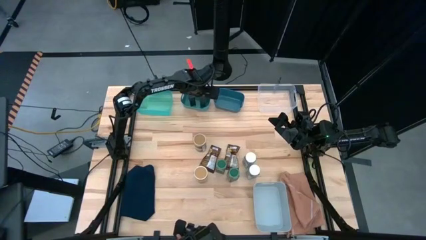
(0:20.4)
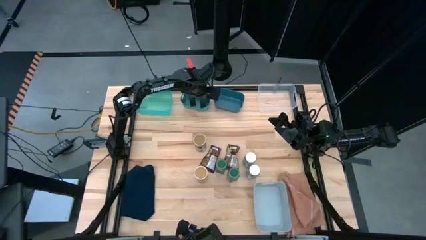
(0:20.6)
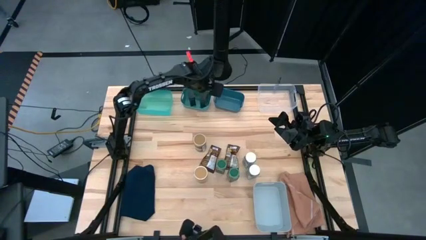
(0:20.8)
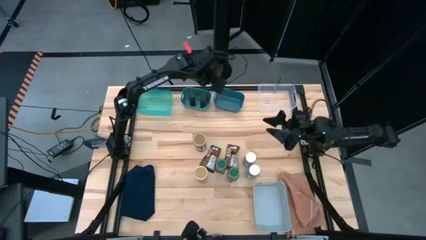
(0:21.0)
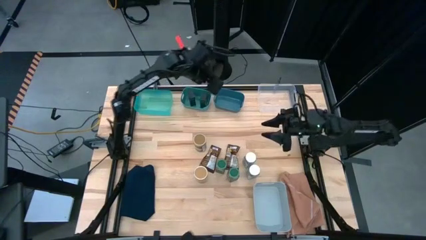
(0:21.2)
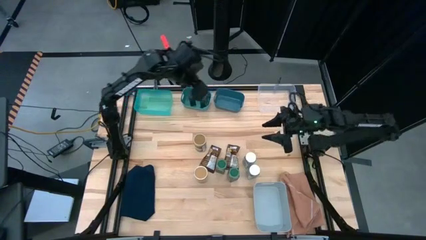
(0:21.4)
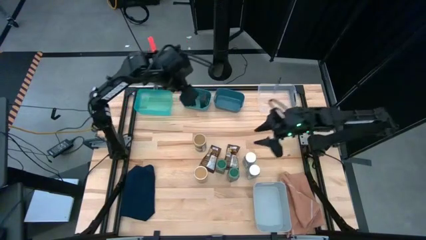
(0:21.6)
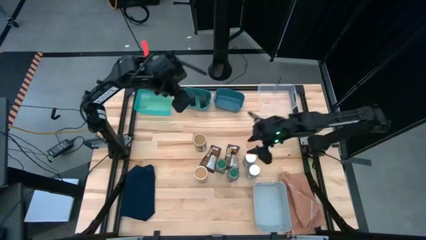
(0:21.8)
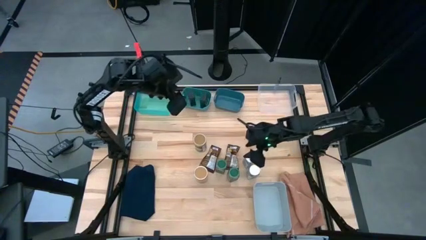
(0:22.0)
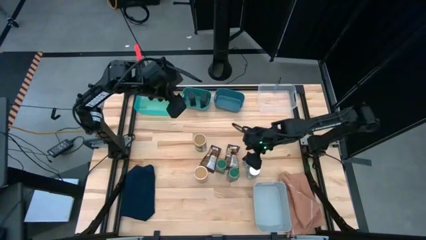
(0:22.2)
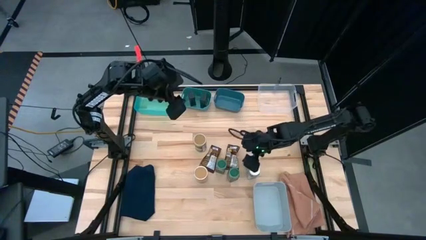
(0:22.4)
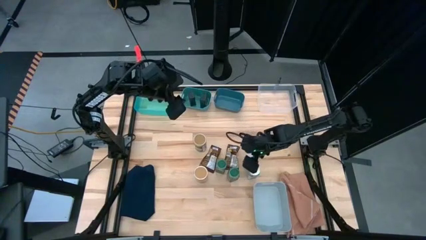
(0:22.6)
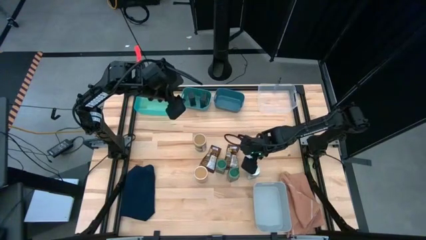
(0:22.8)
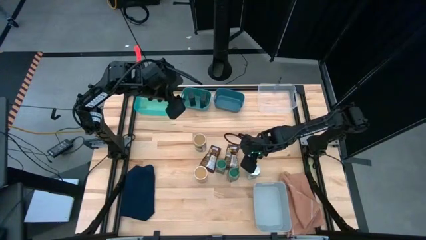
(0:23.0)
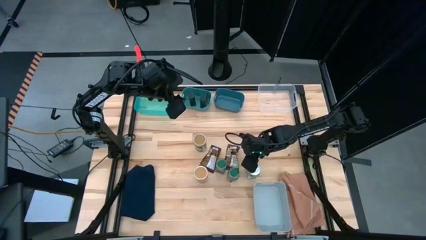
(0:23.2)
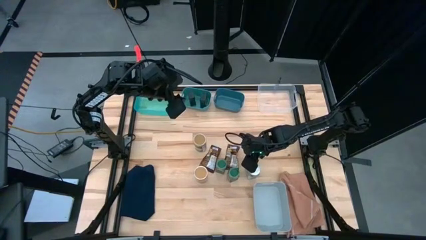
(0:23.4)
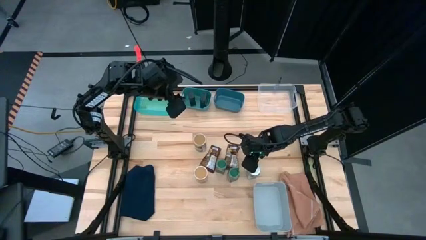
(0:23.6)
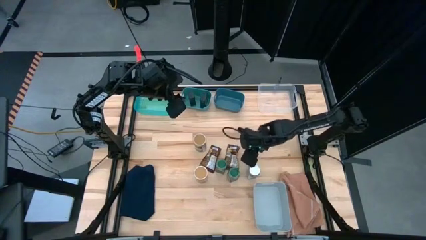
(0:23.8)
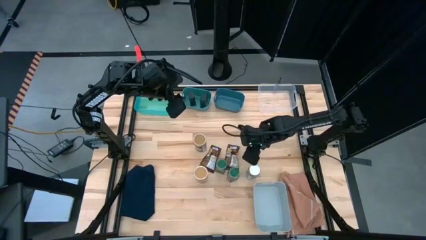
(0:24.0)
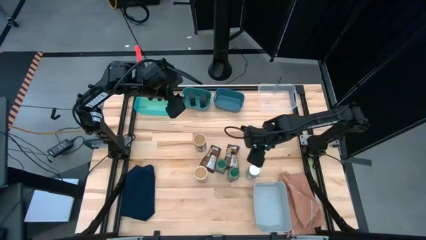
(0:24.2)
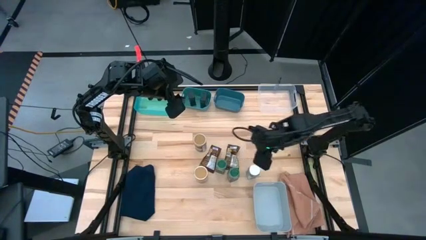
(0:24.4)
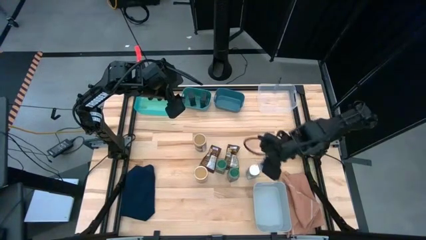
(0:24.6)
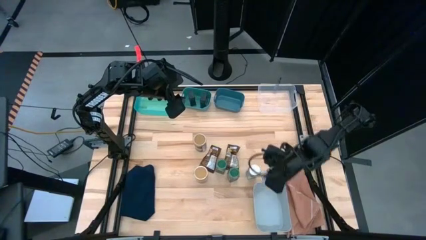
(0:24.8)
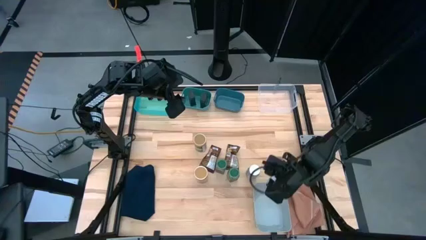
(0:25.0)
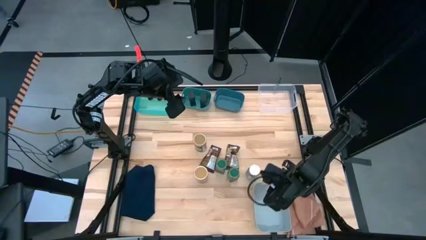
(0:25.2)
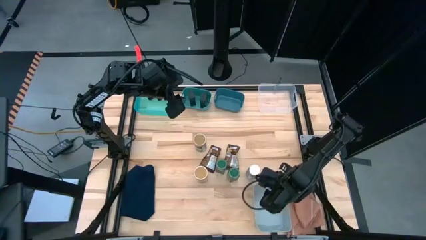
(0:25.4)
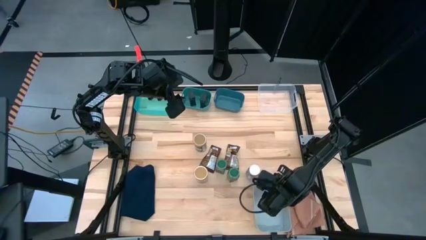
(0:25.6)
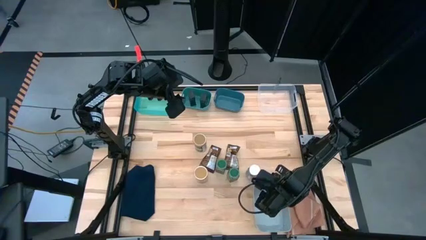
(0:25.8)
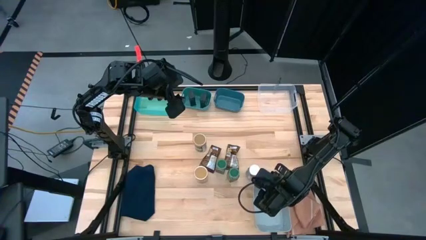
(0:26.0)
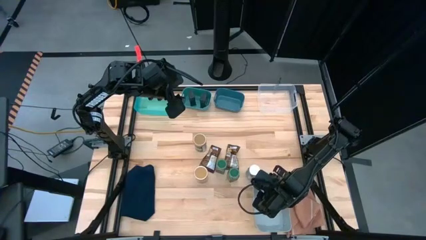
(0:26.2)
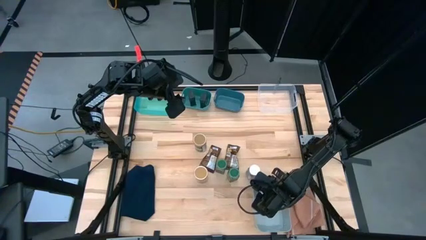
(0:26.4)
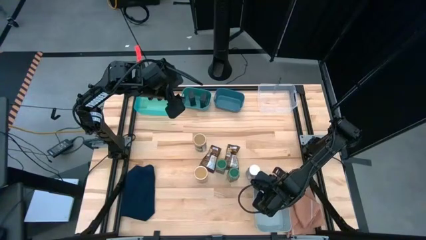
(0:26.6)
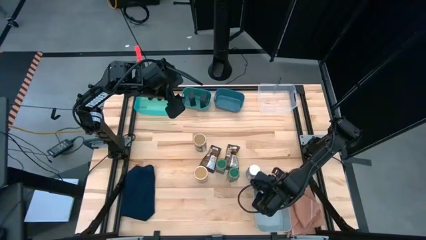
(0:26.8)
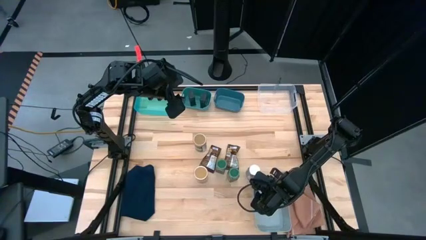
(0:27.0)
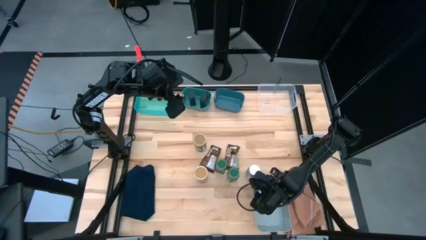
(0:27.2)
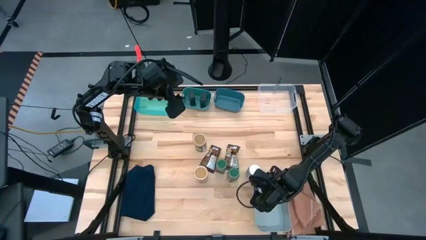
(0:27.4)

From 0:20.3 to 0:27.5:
Task: Sort spices by type
Put the top white seasoning bottle into the gray bin

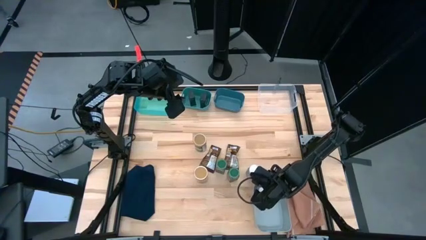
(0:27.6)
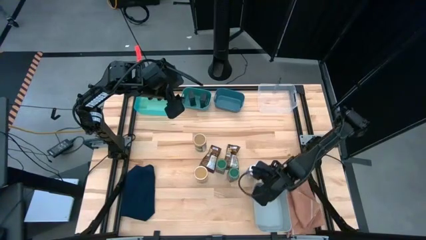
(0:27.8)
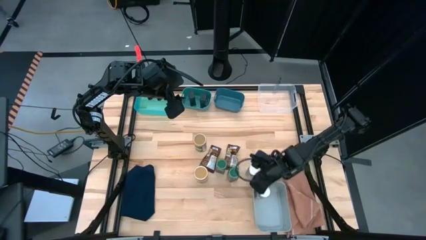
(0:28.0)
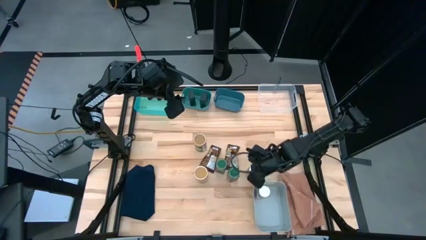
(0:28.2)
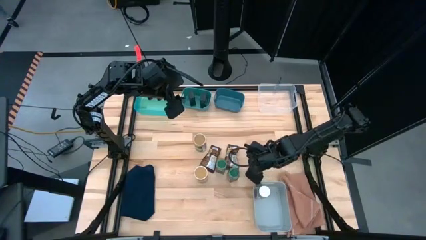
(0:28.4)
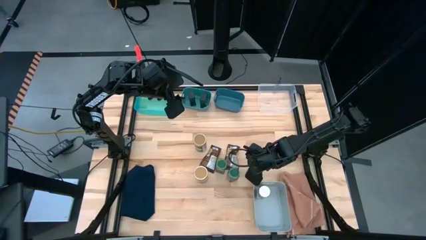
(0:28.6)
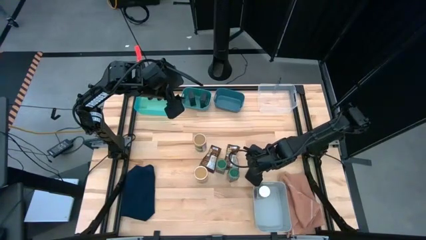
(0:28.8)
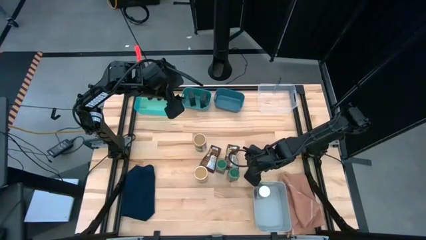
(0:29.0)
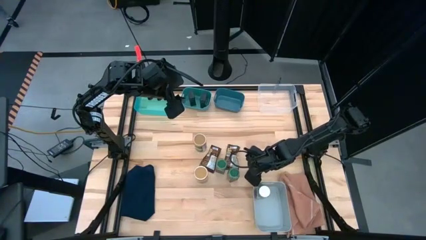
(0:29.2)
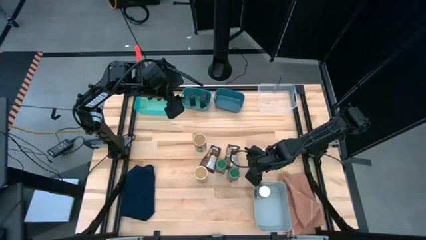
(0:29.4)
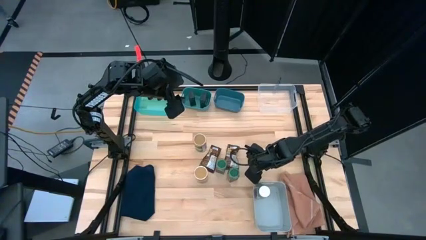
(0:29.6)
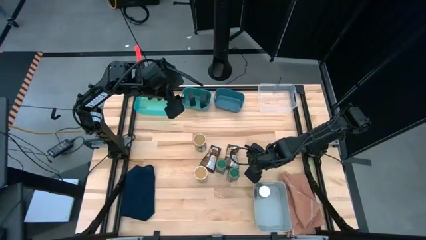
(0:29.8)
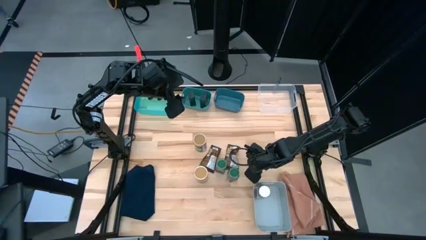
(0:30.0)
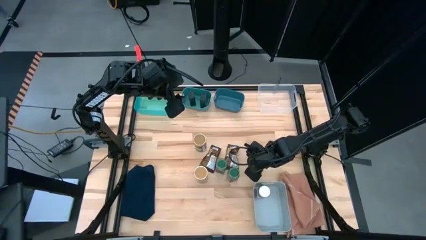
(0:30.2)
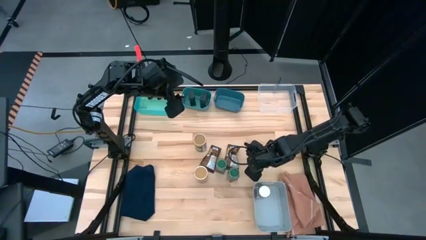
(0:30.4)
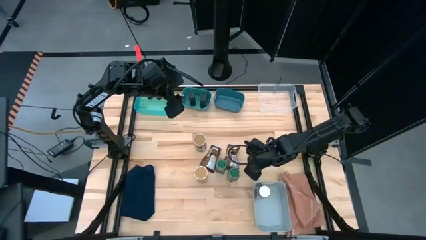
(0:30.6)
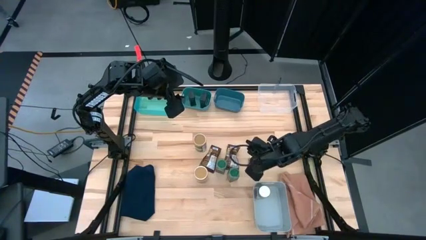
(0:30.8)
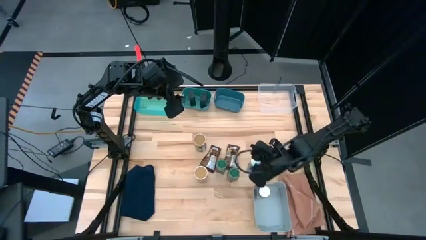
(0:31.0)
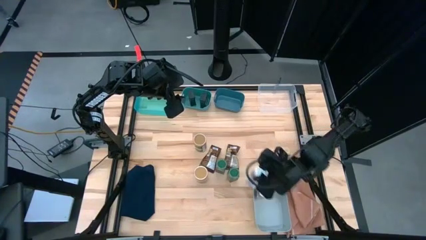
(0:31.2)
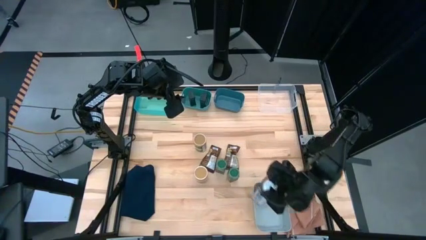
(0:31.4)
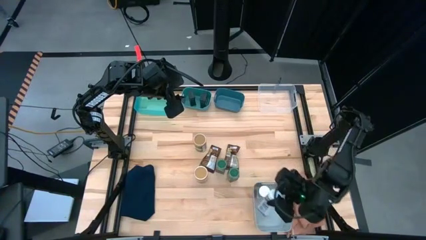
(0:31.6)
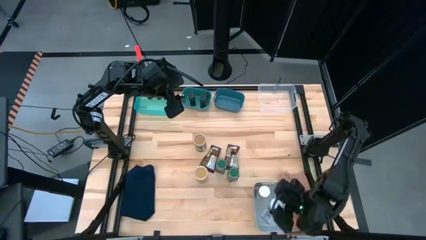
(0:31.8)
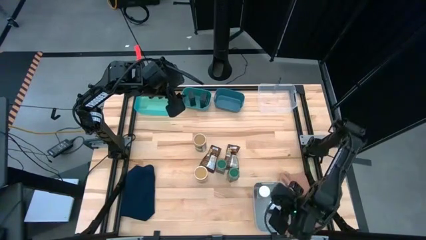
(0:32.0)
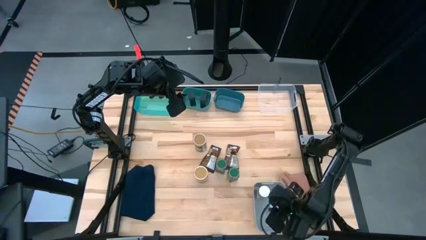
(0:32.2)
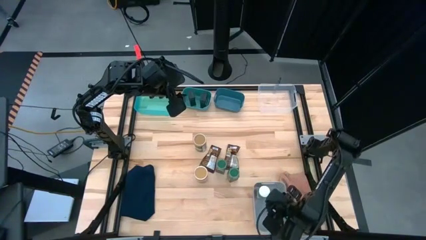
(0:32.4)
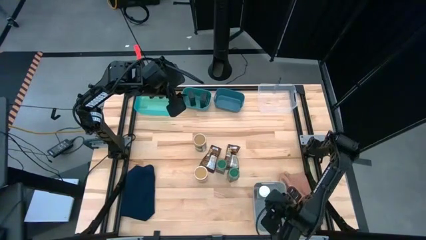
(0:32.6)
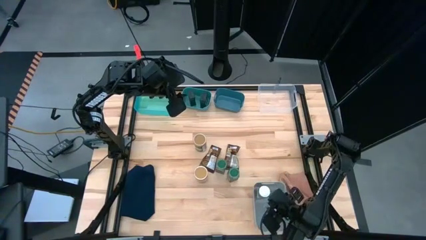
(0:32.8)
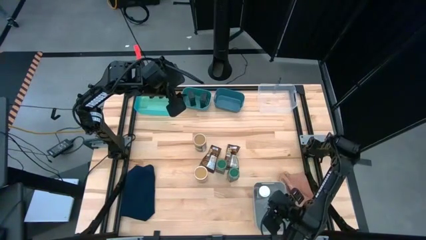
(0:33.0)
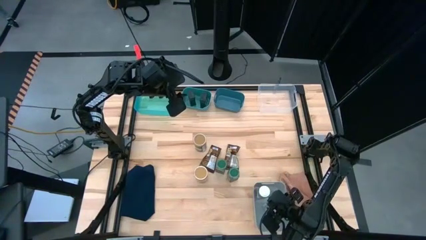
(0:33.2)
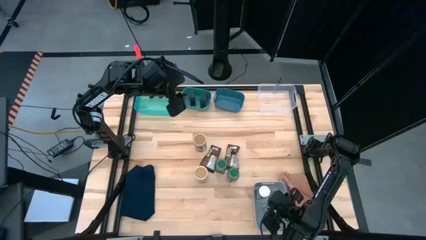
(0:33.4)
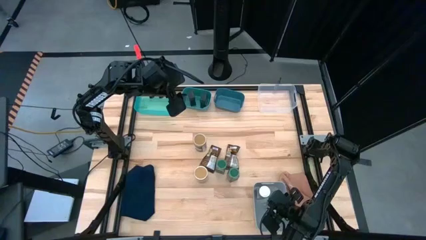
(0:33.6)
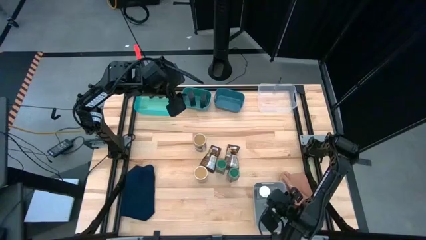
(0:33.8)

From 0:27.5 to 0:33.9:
Put the white seasoning bottle into the gray bin

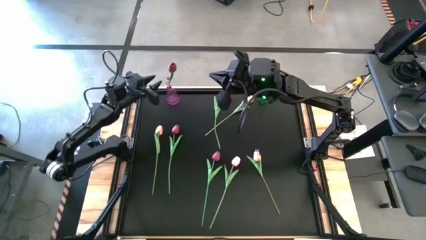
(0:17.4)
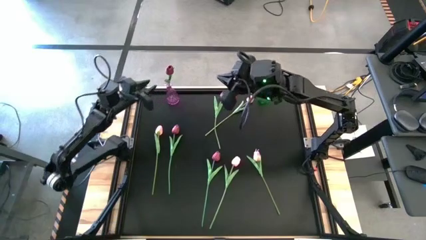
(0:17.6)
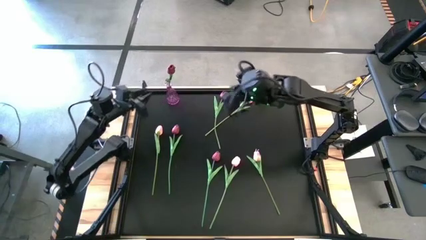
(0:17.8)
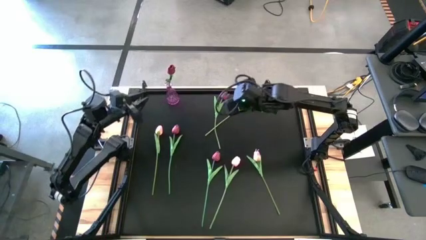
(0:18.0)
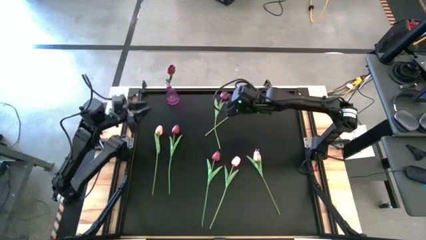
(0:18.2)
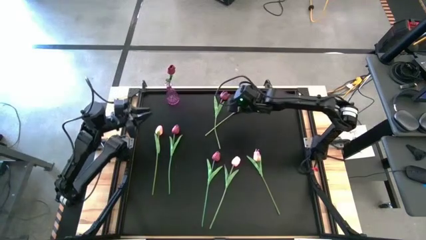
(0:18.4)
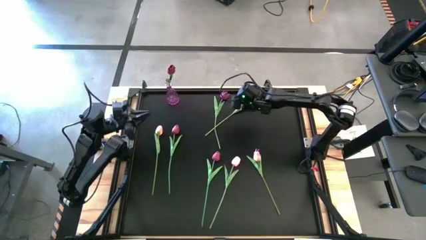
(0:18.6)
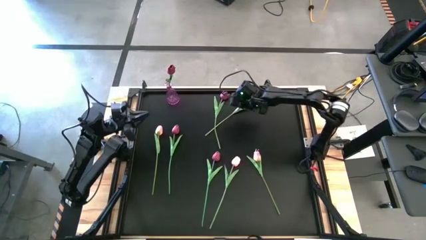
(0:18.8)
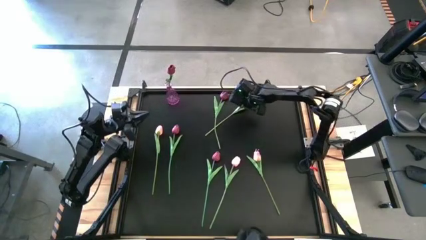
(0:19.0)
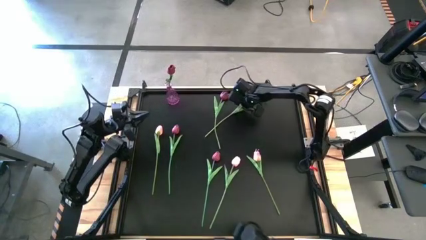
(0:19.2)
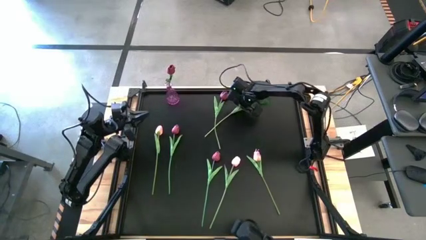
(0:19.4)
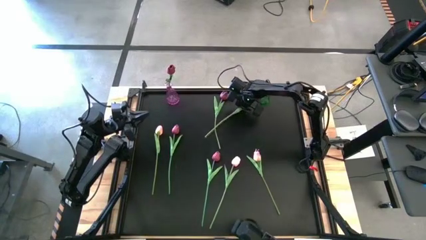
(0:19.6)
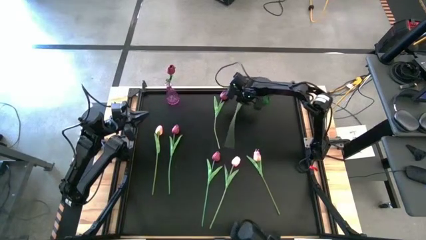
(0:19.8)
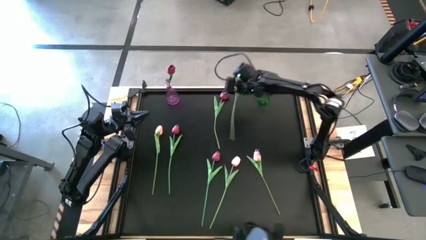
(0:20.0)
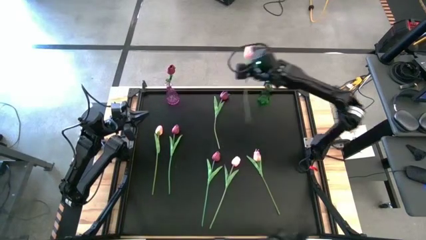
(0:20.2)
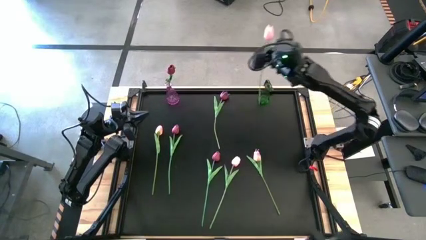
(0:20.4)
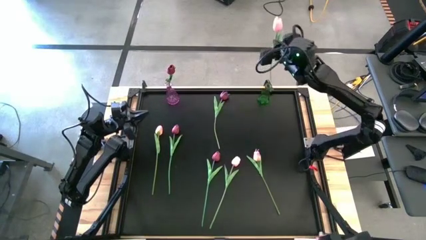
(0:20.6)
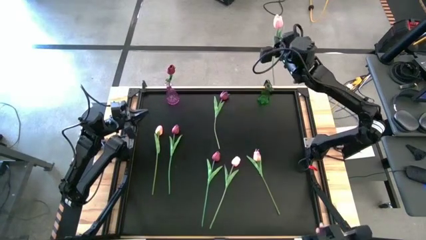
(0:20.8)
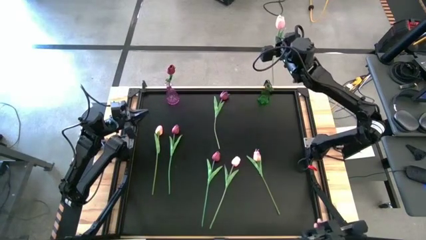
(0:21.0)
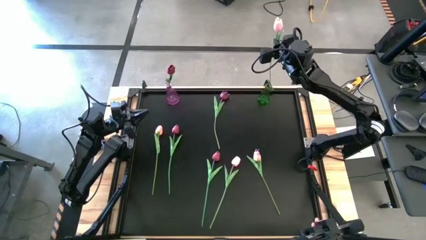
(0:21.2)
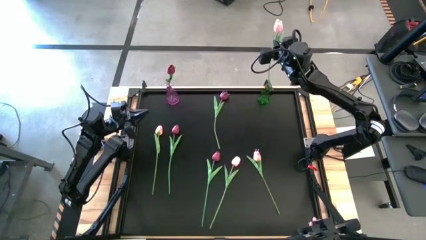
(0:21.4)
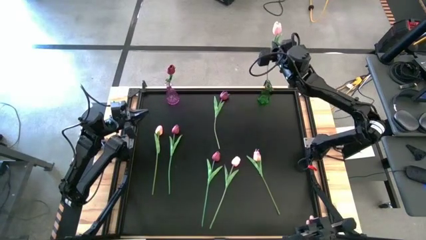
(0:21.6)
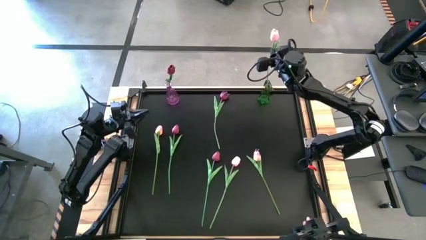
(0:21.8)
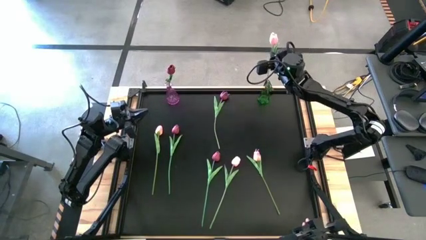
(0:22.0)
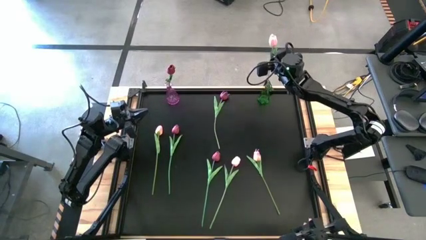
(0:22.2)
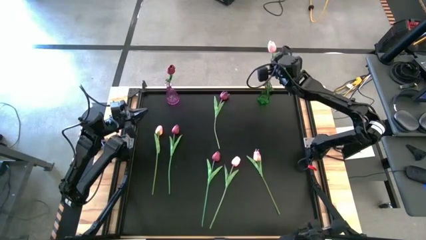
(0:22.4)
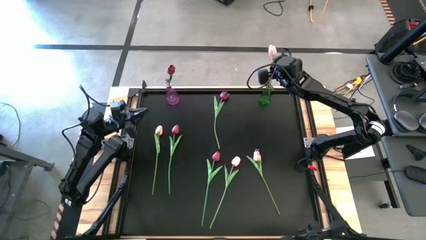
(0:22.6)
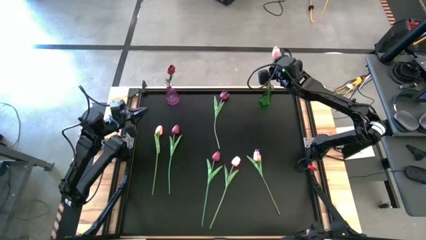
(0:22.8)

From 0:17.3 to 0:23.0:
Task: Sort flowers into vase by color
Put the top pink flower into the green vase
